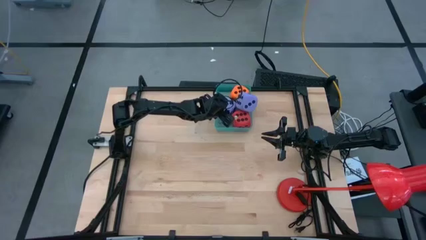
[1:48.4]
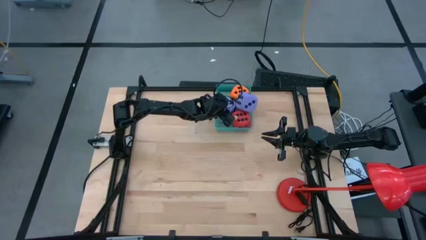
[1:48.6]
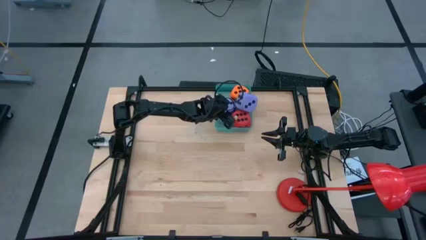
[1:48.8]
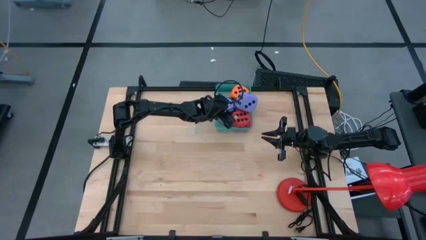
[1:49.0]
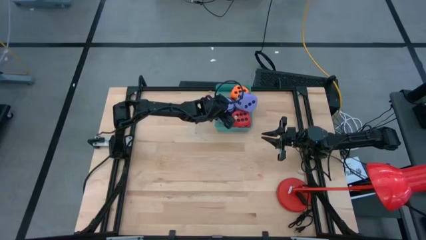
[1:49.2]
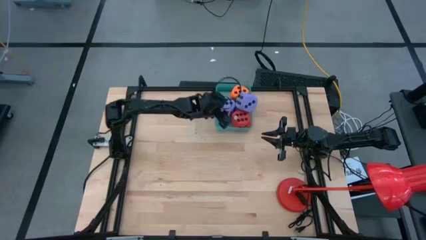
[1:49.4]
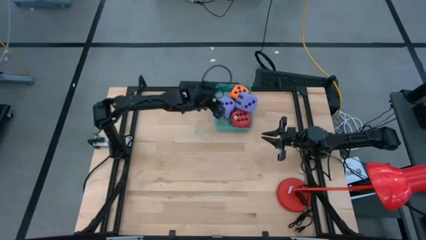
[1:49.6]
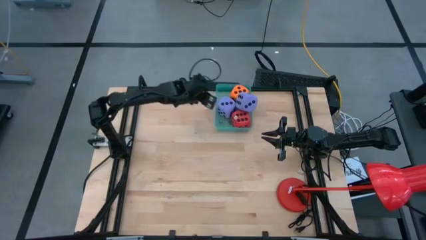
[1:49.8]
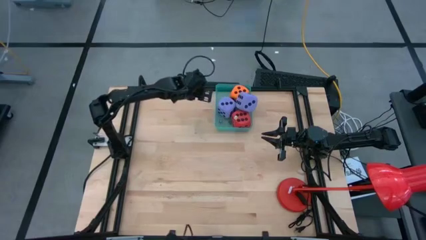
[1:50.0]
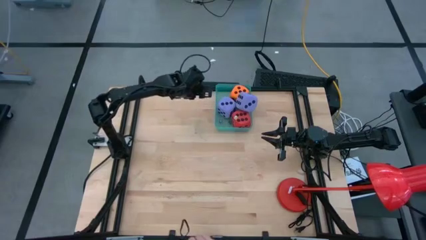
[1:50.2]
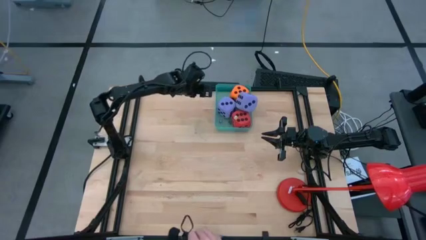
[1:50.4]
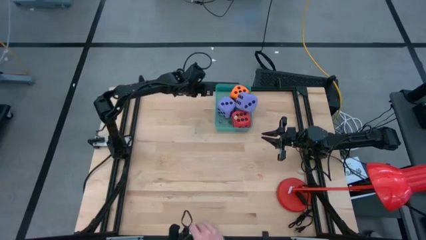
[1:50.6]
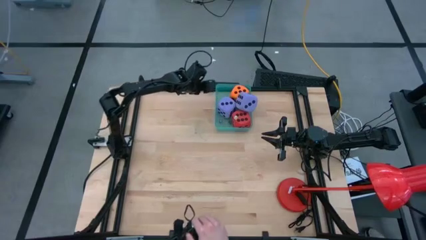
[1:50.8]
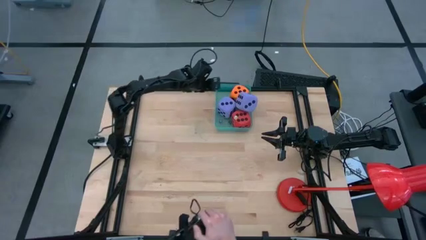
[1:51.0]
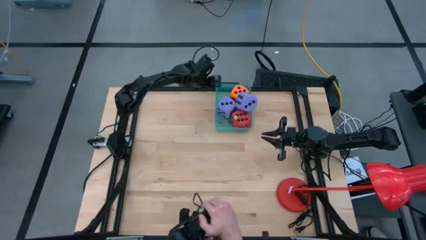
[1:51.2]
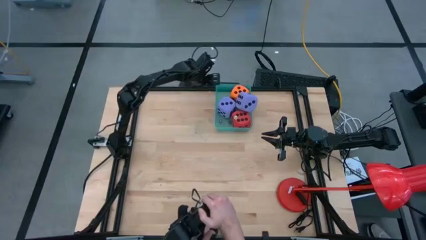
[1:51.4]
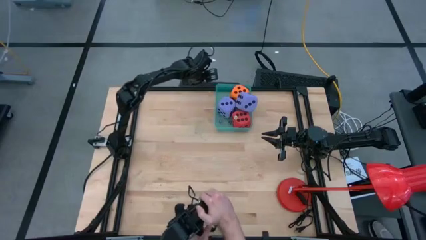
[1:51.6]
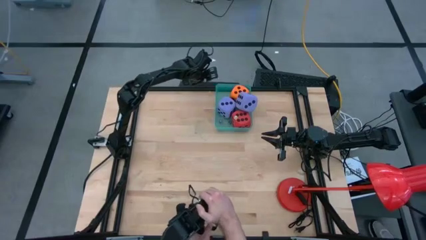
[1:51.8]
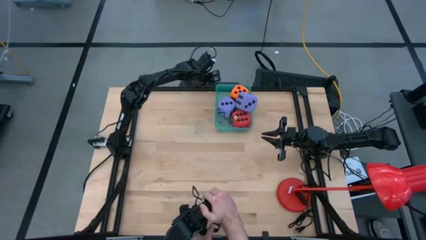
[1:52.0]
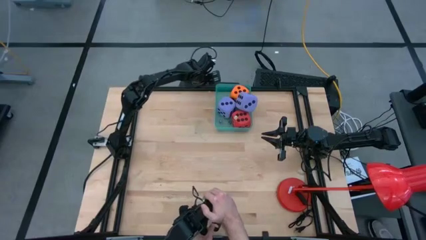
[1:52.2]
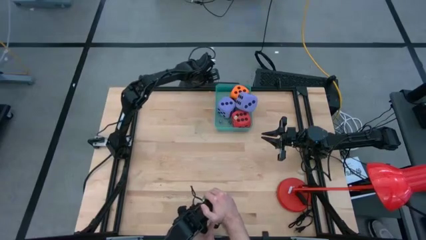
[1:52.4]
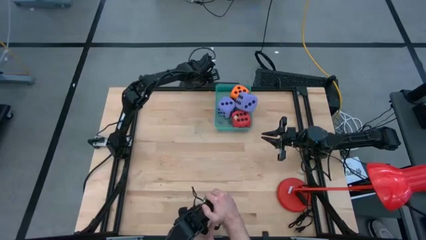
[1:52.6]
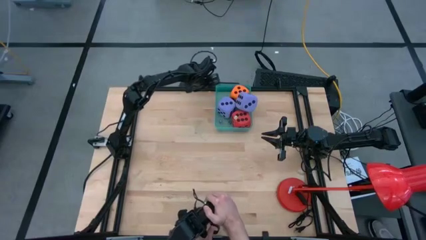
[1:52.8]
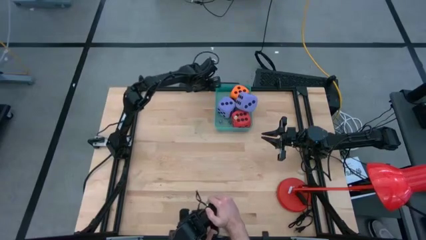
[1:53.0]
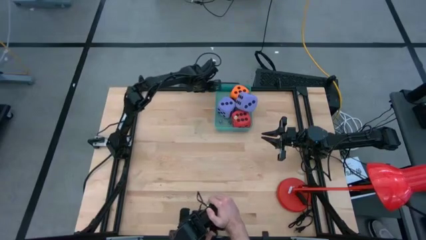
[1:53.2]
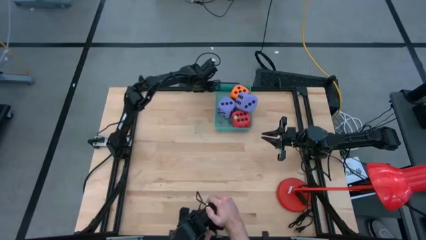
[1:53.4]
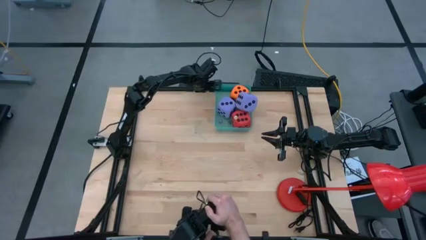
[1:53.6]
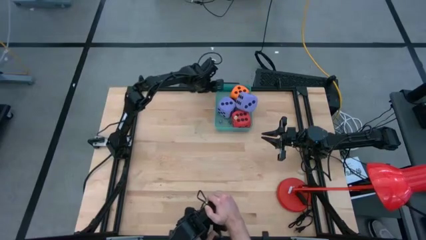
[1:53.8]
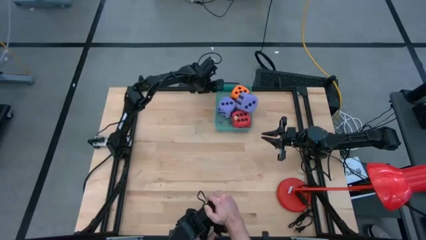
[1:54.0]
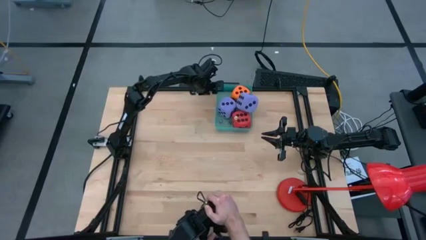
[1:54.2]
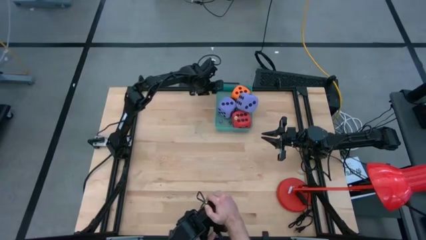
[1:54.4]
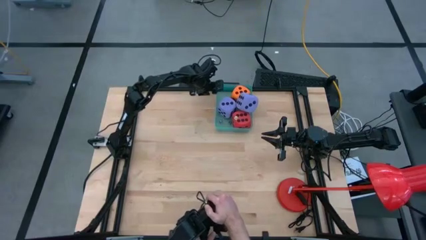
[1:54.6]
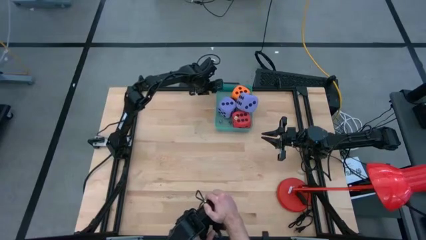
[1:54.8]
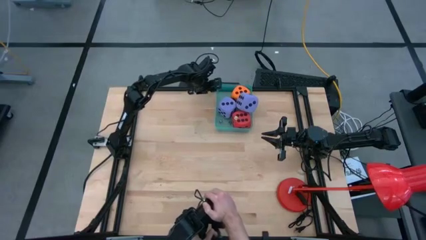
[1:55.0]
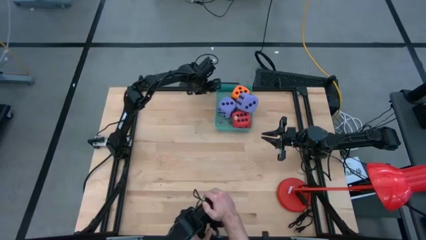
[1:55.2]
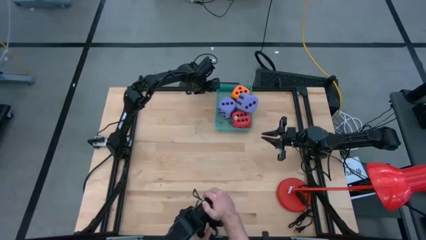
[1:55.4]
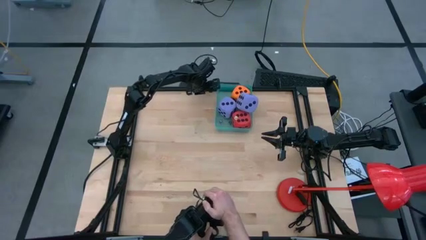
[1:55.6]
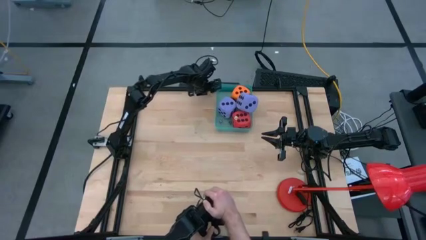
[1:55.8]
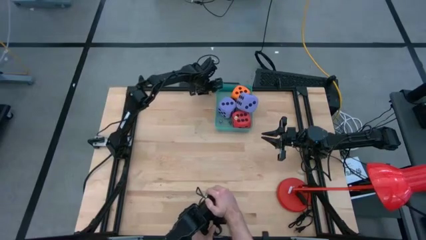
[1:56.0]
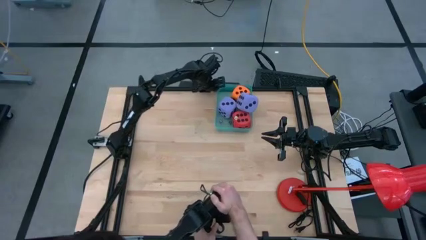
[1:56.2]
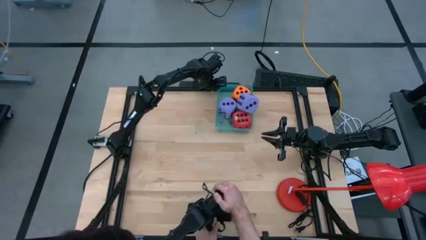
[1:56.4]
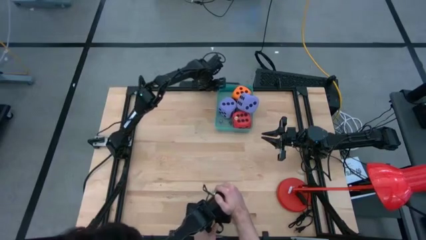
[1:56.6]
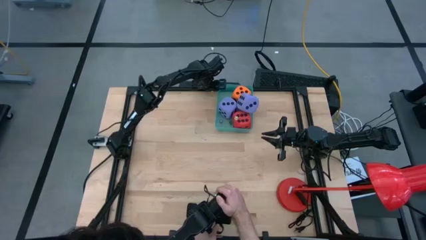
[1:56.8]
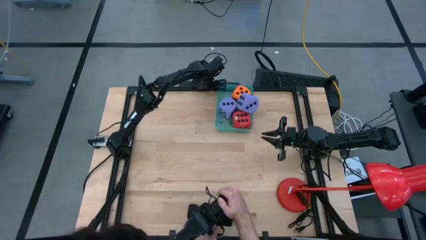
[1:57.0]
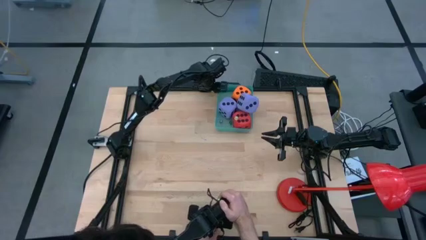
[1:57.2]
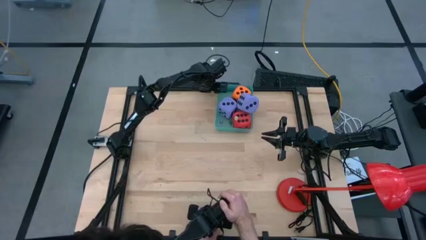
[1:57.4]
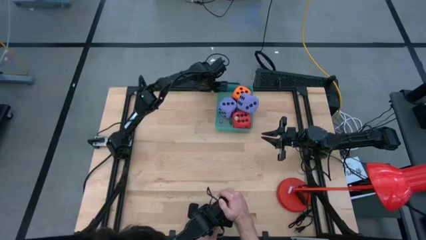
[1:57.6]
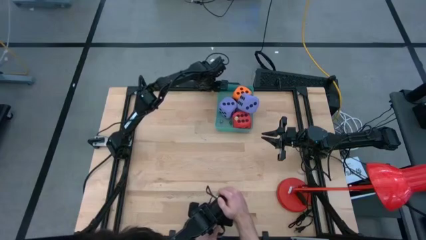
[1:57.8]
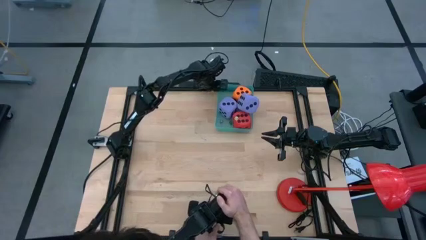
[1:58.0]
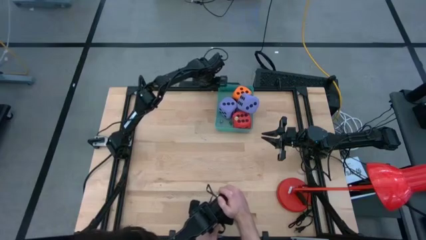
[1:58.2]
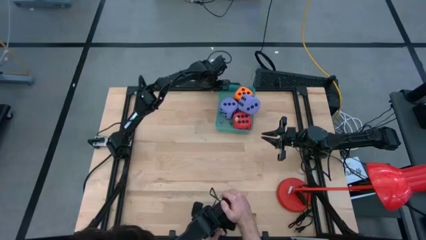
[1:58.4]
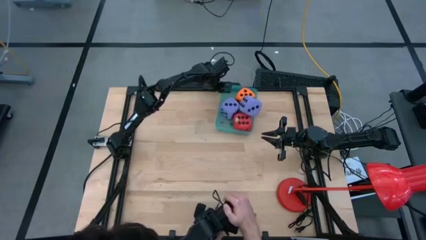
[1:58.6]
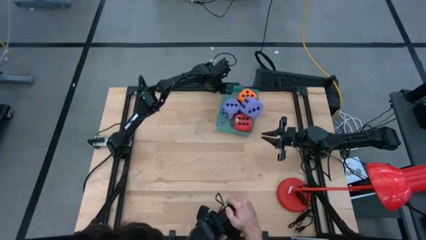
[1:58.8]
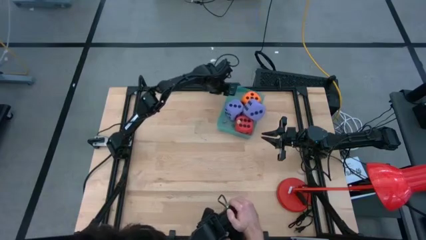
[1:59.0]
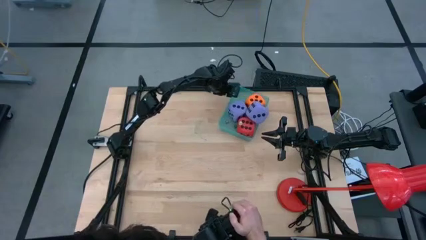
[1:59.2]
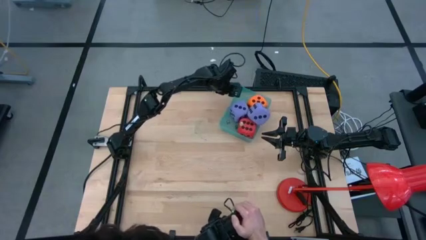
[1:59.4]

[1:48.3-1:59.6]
Task: Pick & Place Dice
Adjust the green bin on the table

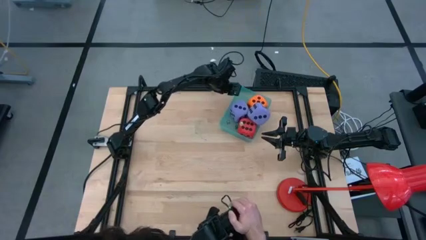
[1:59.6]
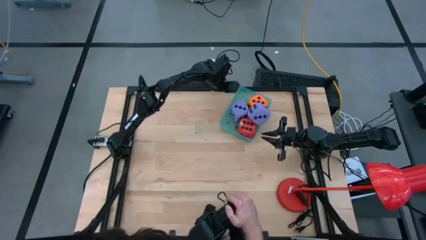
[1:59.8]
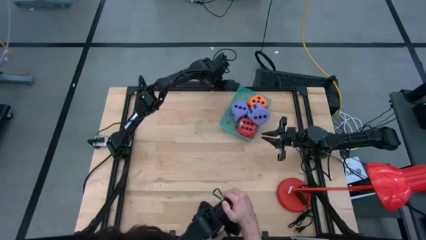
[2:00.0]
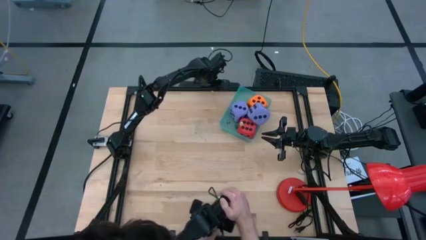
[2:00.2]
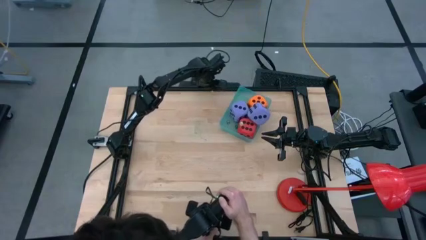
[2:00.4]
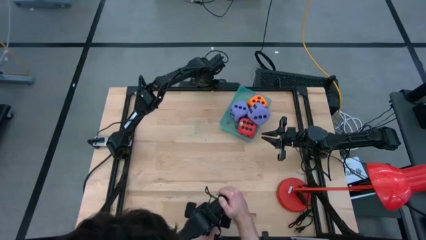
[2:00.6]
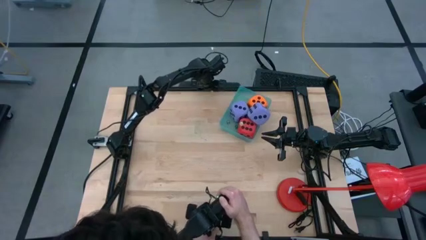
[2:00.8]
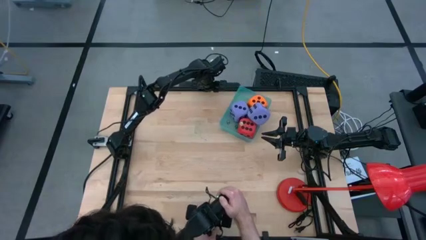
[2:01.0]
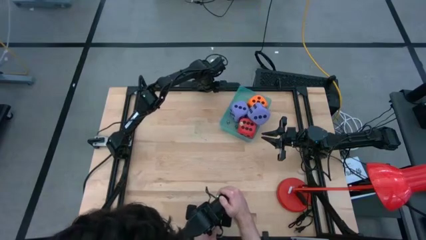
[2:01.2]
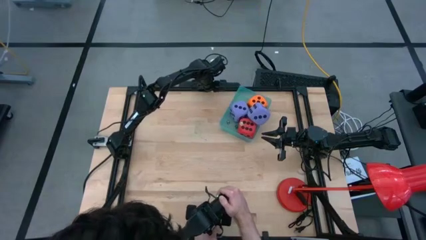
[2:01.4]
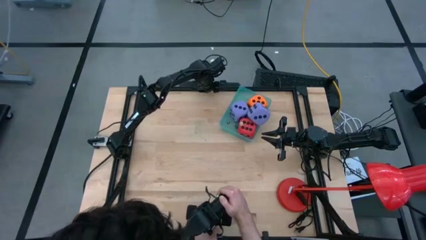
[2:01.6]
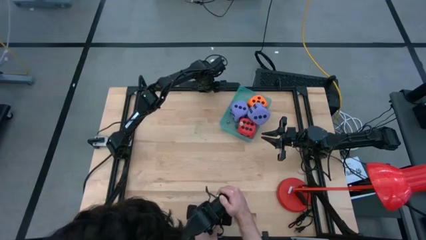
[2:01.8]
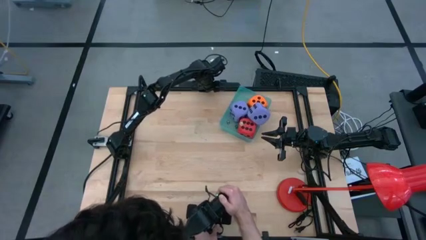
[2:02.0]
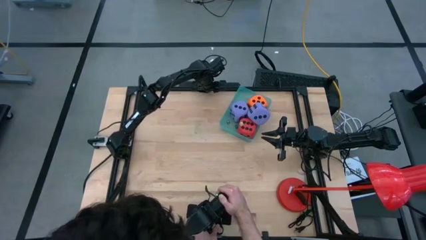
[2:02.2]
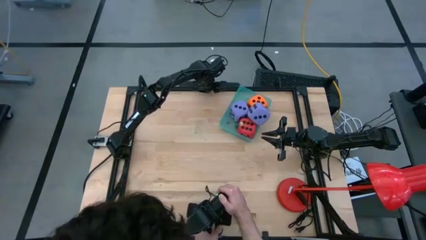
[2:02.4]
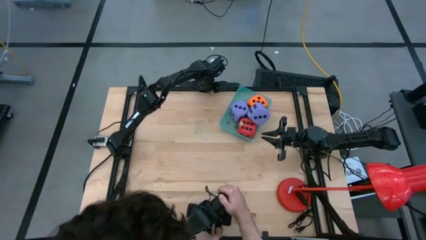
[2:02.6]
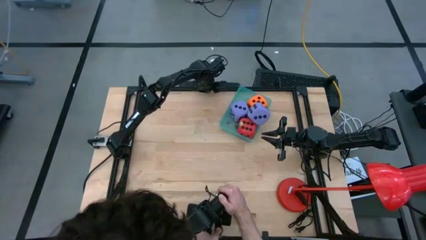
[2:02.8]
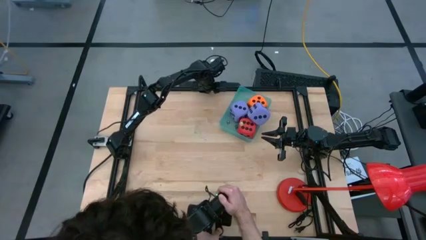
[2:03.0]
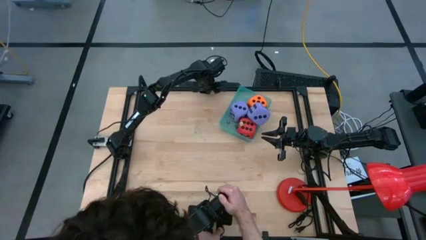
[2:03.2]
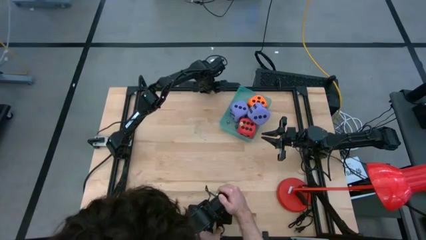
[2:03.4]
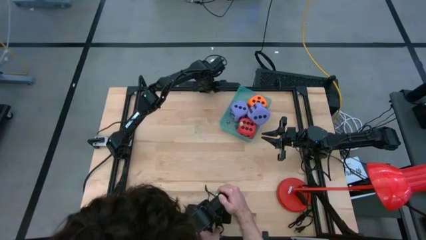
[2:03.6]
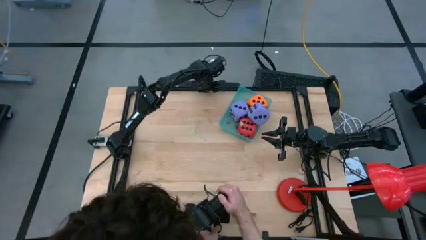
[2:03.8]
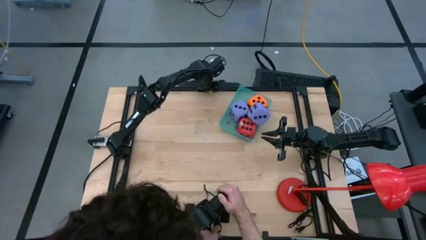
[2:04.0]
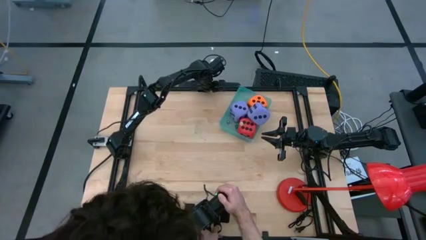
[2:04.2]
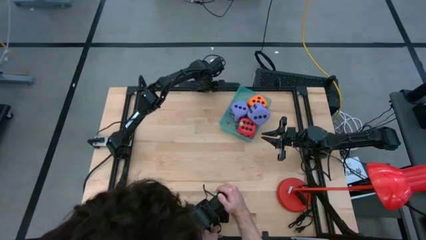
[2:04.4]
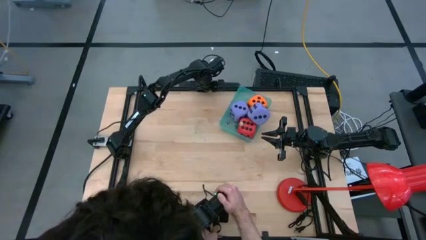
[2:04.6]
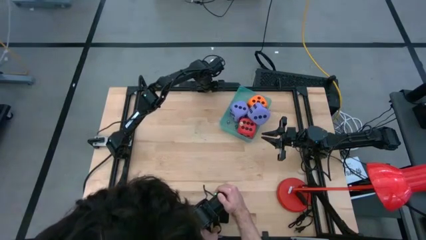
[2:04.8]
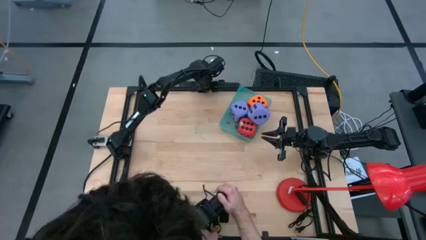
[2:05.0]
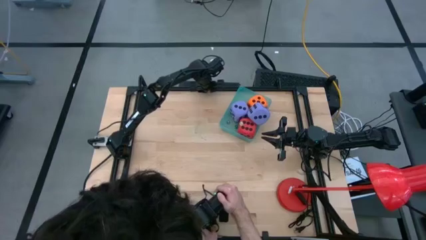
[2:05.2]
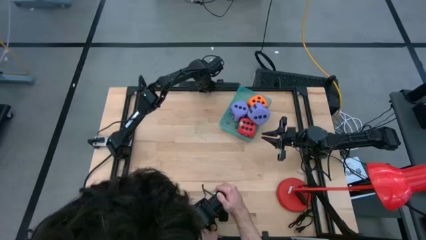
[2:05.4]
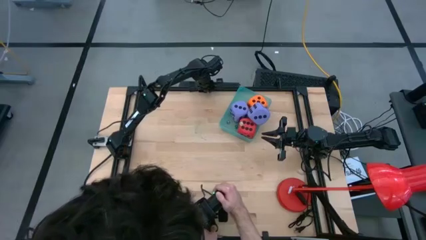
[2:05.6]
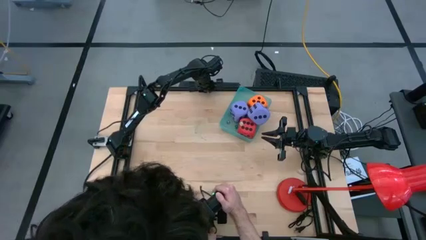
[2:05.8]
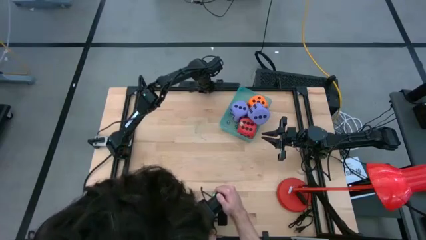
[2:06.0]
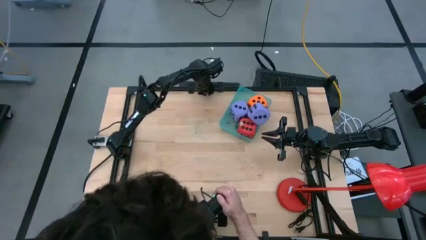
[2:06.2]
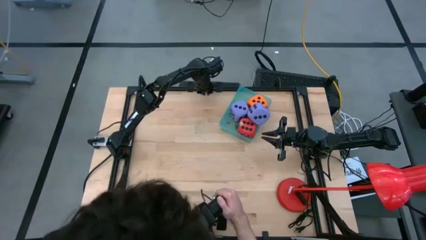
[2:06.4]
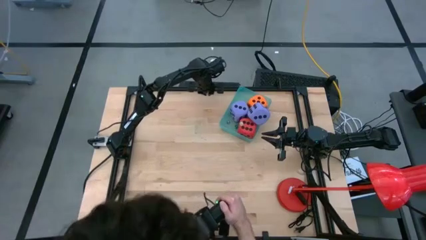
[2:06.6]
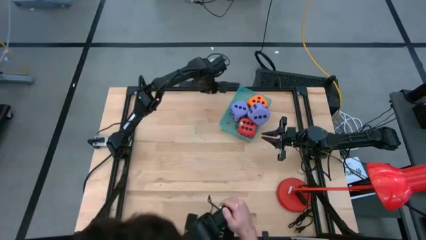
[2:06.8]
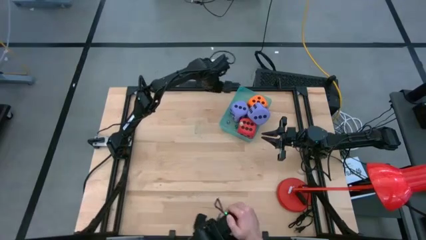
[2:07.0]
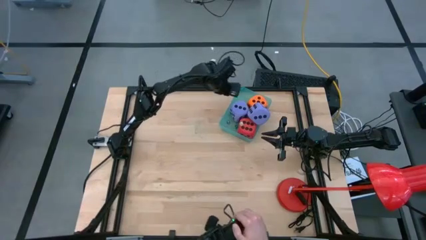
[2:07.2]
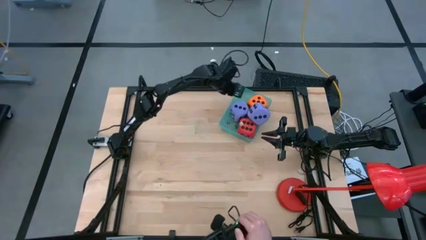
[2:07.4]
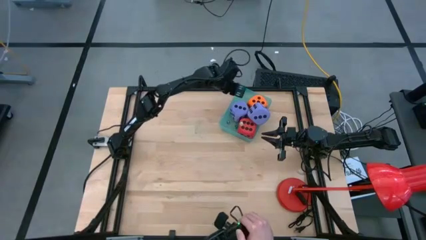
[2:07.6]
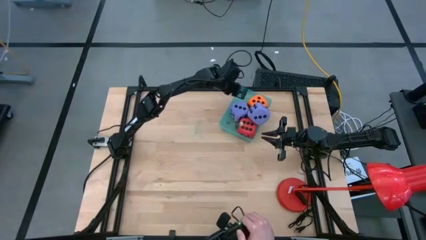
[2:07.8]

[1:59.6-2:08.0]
Put the yellow die into the green bin
